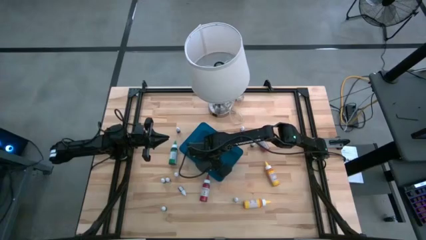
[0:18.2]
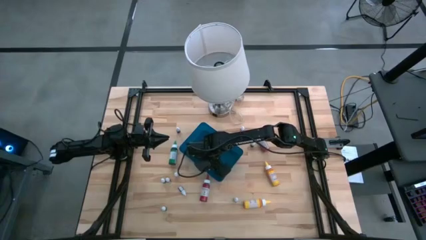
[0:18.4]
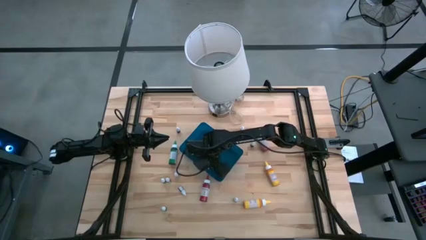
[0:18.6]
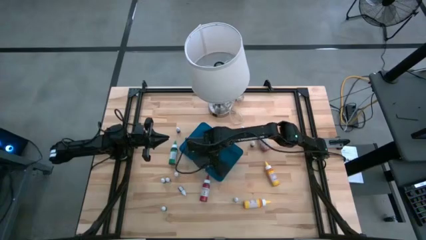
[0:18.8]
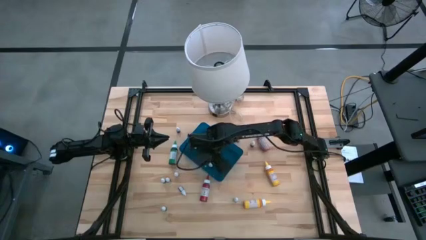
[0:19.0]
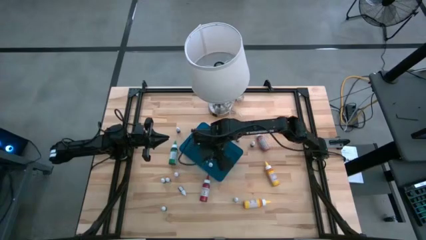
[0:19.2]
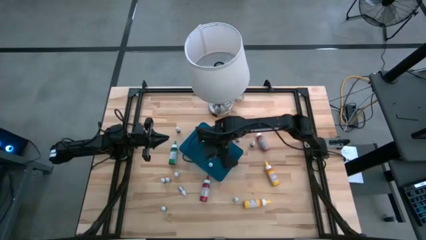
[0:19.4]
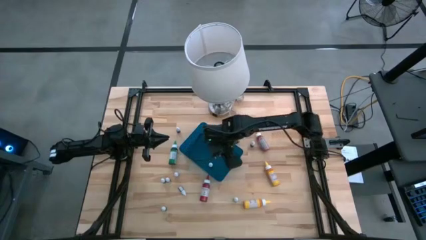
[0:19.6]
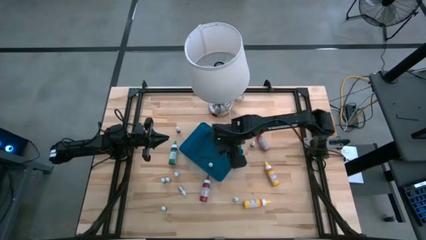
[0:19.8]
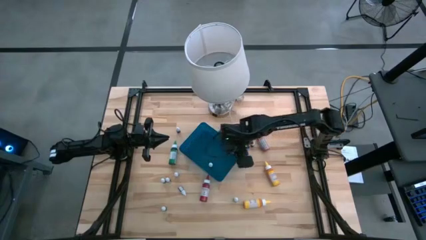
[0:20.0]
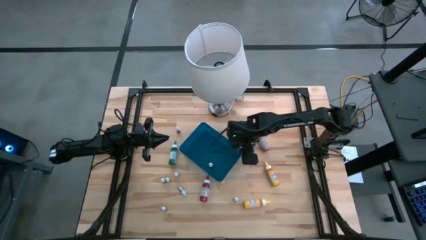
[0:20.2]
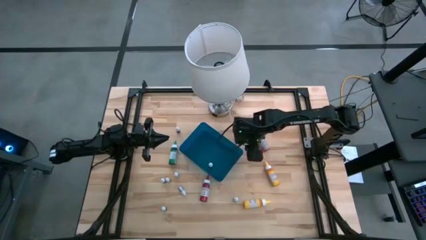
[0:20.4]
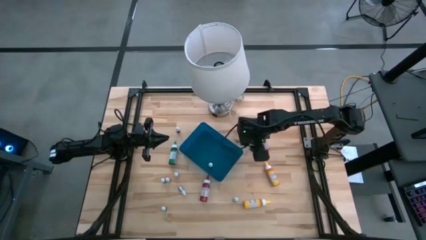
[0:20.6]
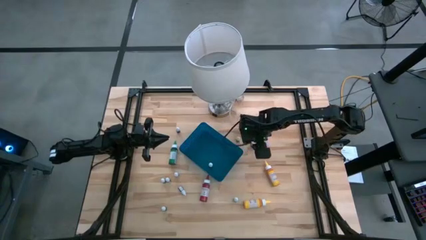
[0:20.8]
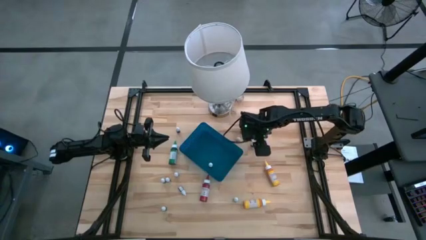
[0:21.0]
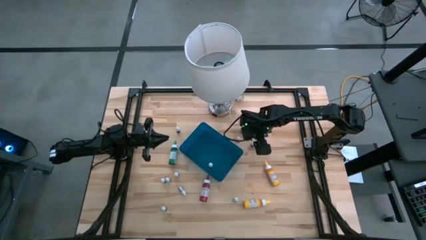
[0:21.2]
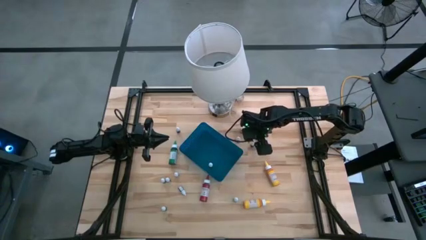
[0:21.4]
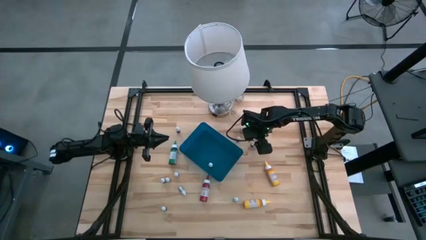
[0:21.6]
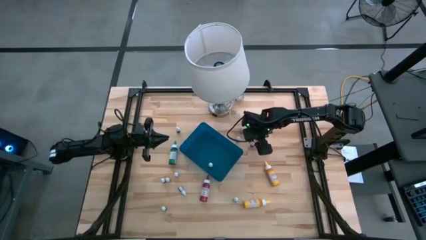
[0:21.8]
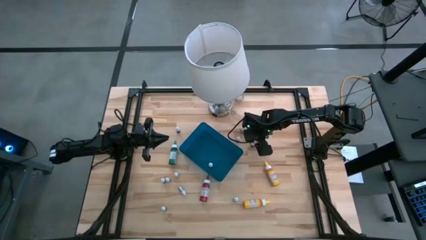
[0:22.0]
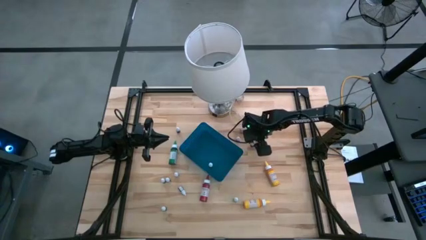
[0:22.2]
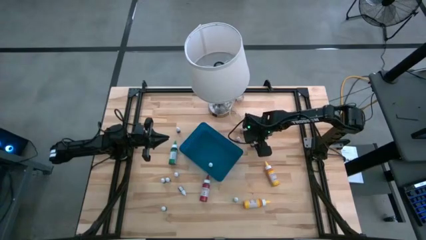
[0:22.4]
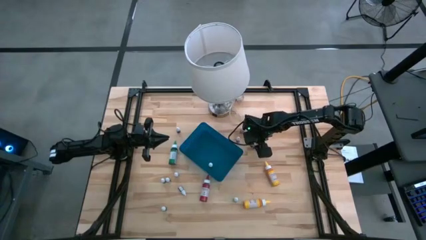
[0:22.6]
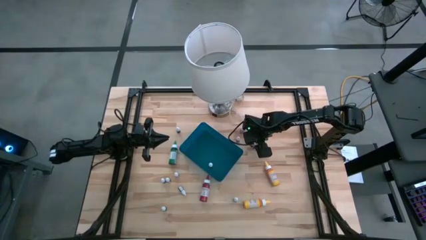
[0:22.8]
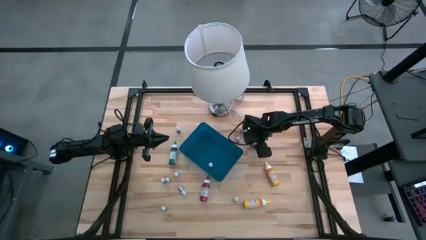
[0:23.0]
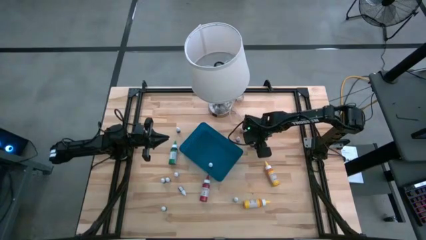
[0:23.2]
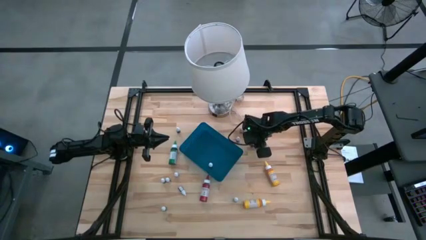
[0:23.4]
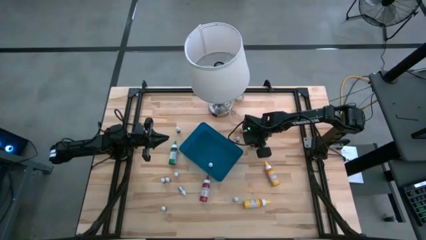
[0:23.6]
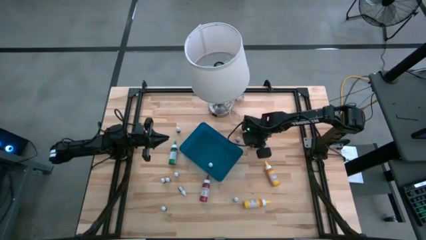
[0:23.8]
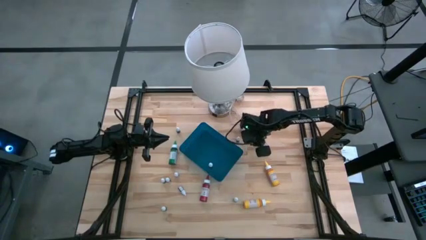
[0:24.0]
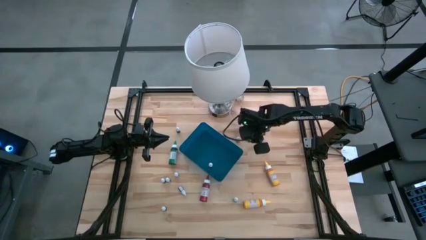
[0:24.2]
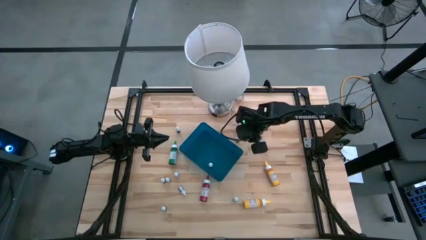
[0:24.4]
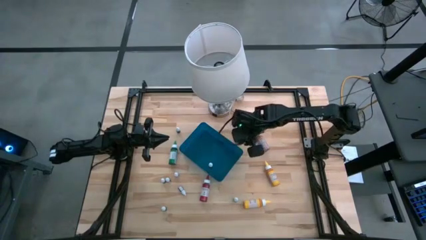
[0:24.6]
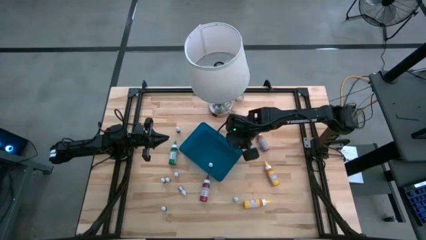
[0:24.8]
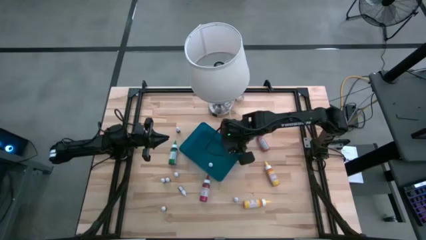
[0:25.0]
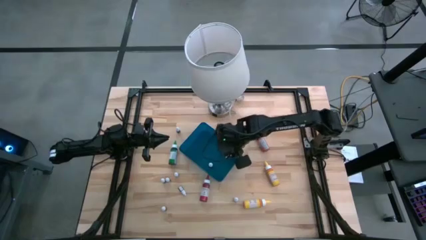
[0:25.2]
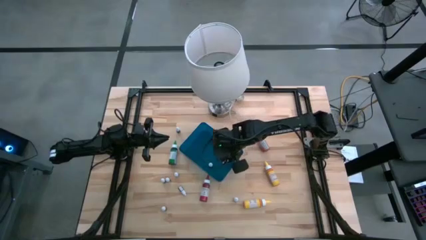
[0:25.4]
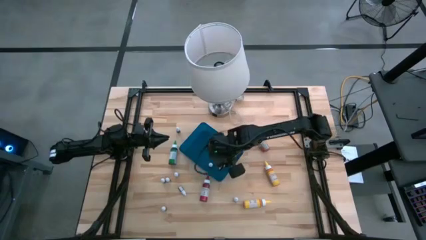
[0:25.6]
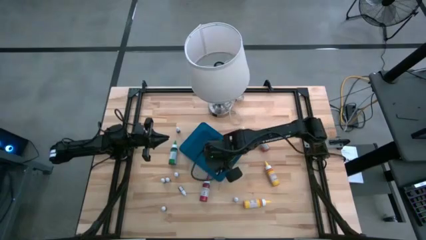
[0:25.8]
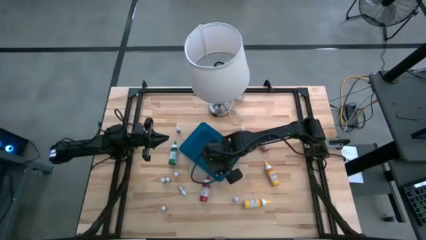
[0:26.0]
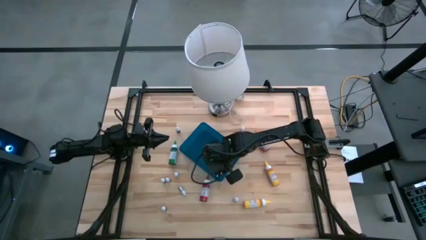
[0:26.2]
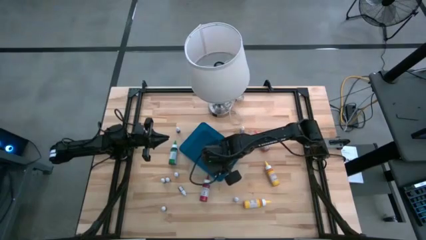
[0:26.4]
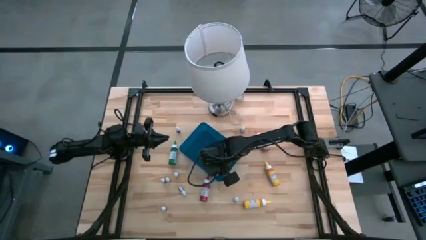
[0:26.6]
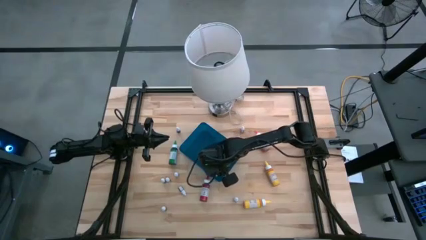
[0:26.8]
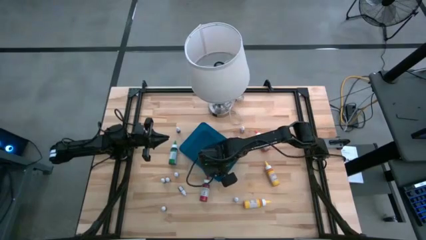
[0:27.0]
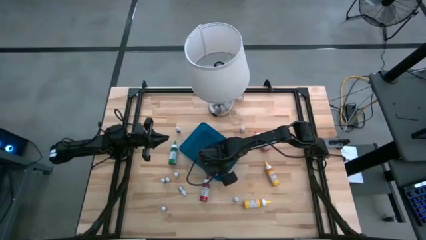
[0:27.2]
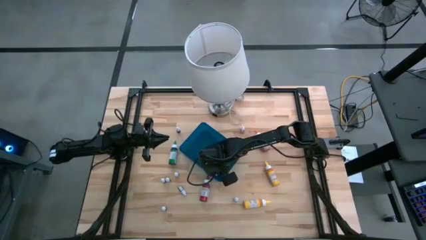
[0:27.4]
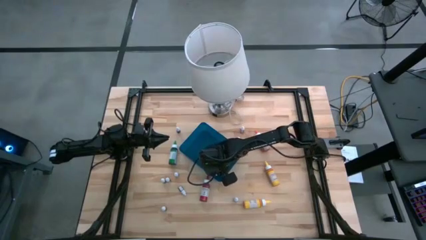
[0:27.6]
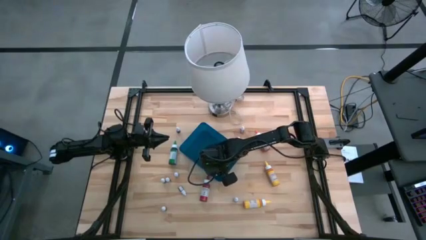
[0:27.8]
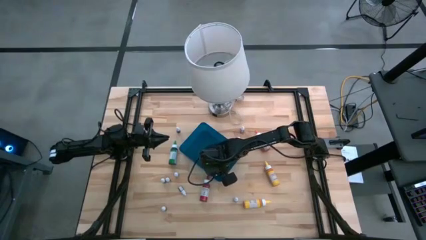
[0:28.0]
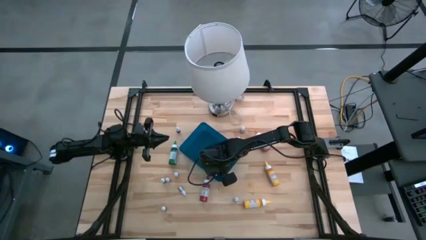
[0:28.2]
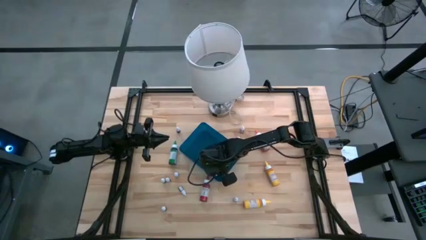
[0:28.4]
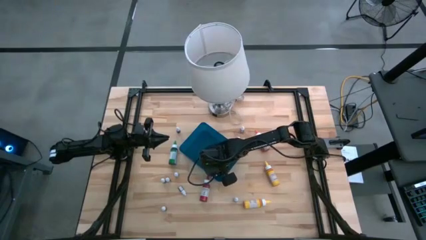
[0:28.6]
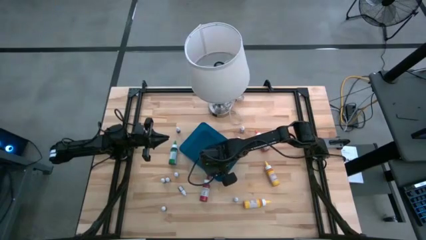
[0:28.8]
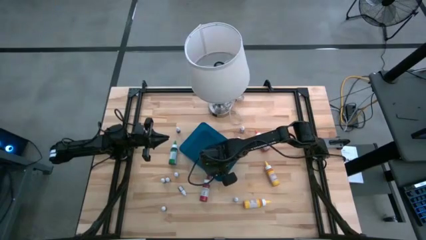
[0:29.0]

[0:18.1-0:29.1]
Task: Pick & Place food coloring
Put the small black food coloring bottle into the blue container

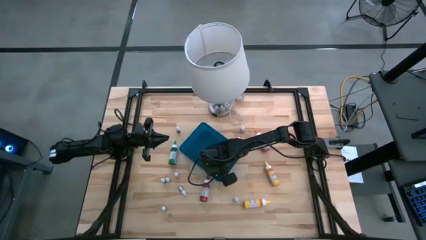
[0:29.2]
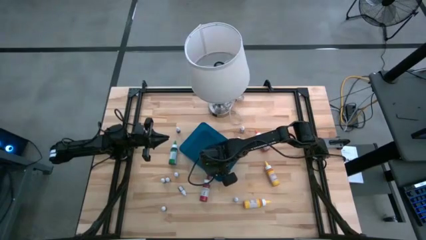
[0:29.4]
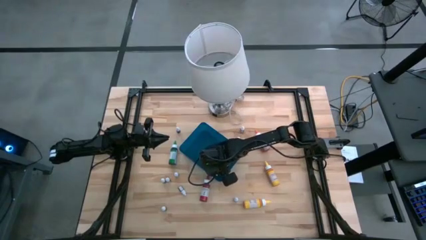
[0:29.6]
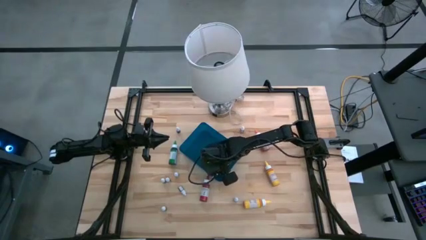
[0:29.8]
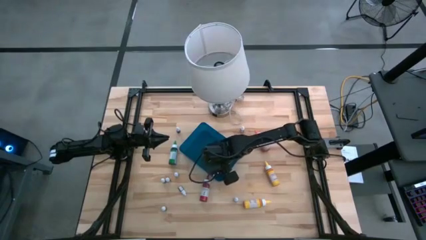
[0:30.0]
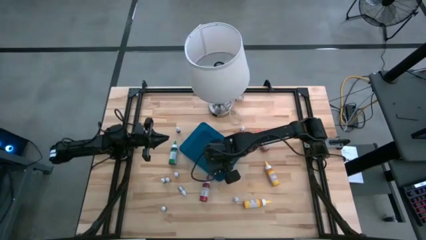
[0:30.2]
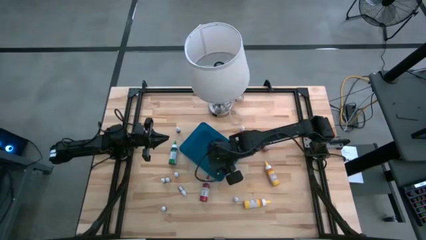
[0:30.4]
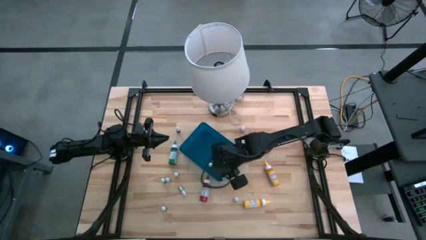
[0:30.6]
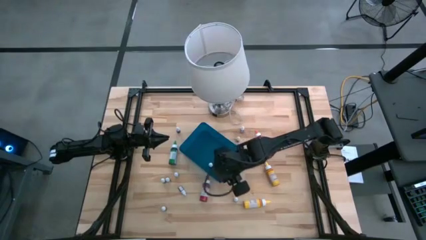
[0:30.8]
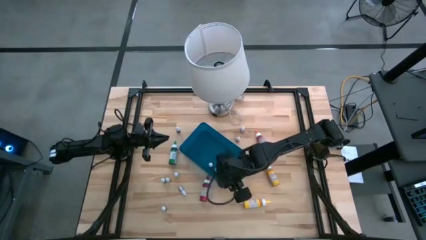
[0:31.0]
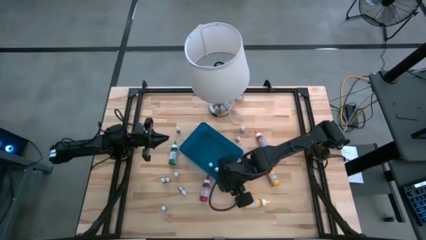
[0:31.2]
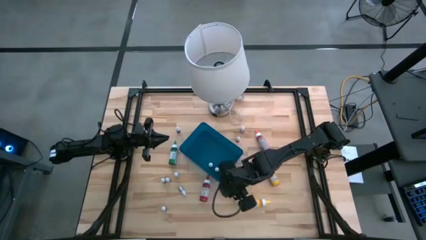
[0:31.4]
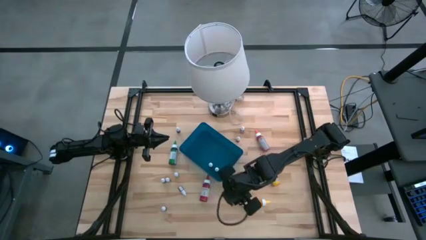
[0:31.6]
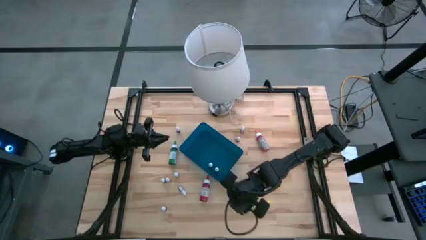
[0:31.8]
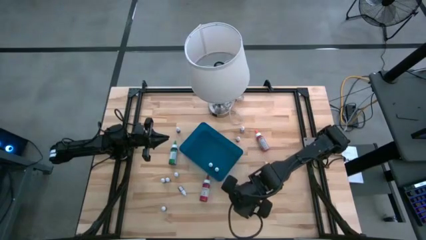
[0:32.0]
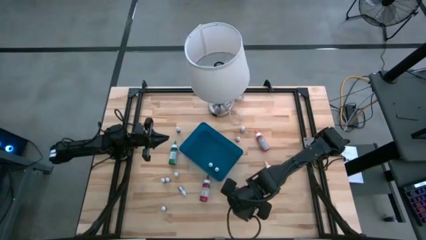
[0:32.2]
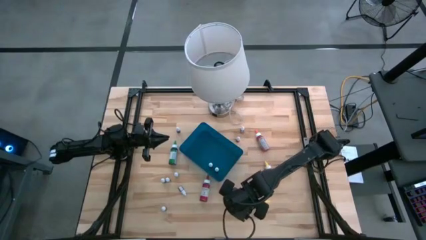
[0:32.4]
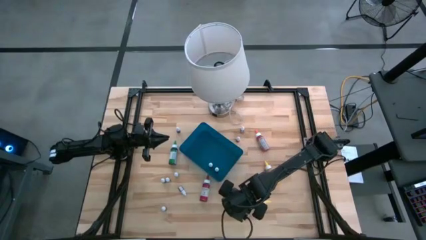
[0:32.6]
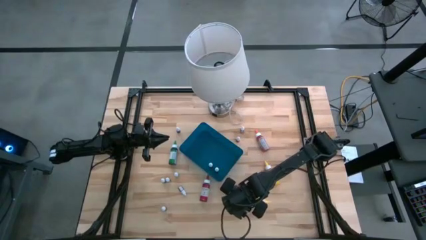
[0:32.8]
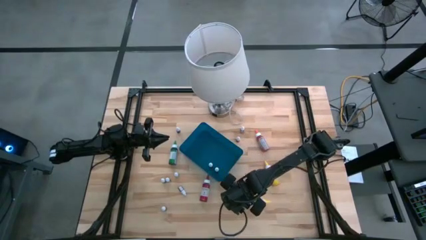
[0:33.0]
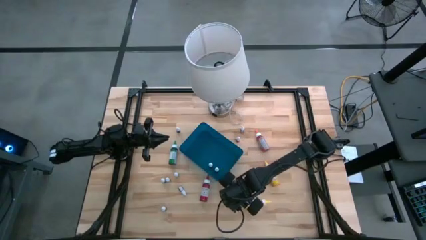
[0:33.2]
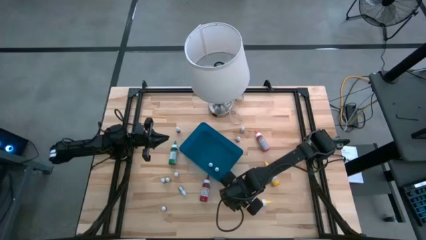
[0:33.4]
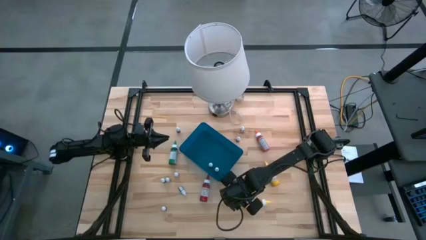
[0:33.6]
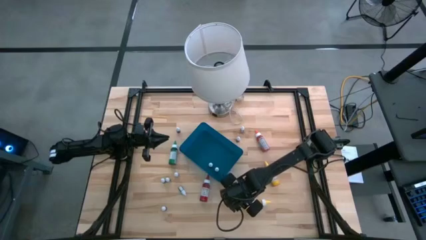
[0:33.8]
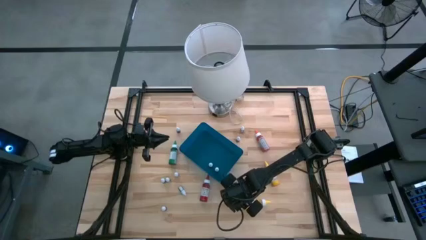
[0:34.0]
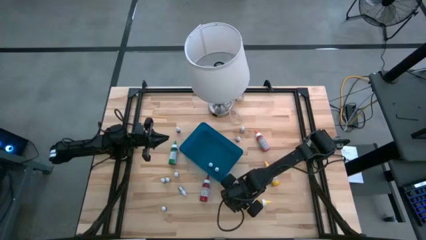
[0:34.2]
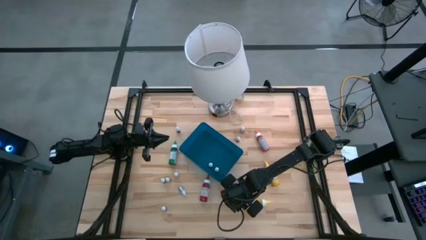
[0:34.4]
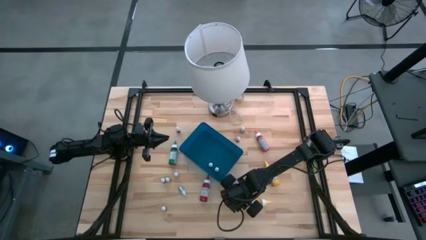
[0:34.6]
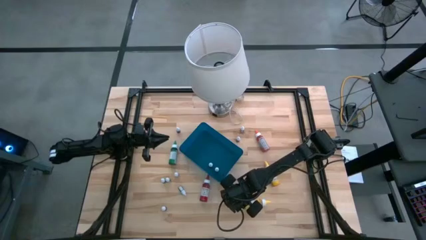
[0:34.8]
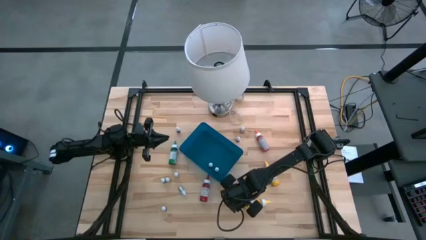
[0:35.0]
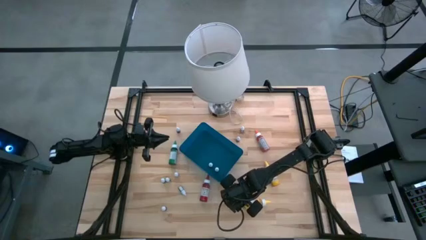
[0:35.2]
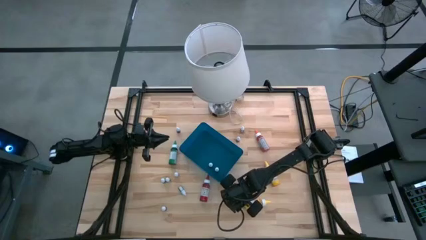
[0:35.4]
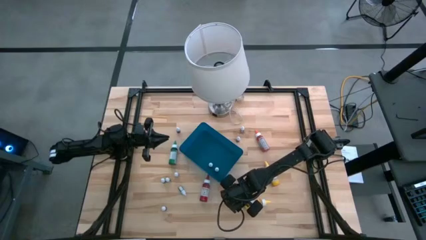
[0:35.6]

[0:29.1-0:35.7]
Put the small green food coloring bottle into the blue container
